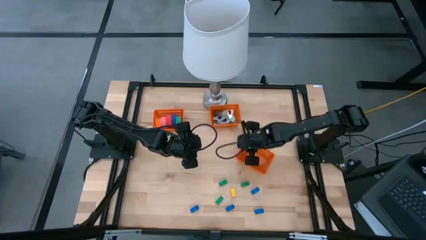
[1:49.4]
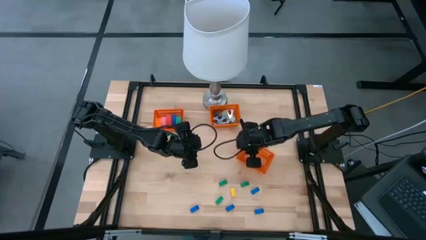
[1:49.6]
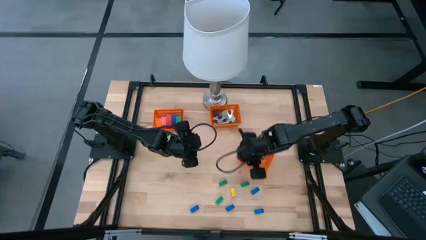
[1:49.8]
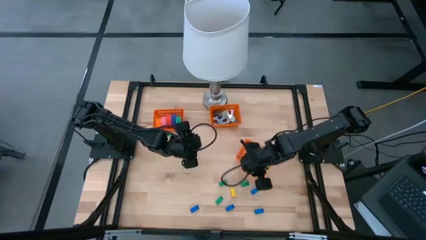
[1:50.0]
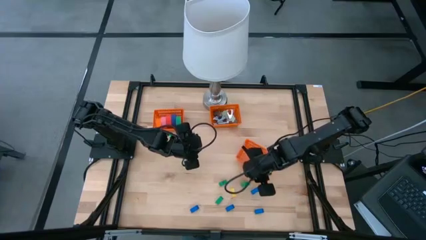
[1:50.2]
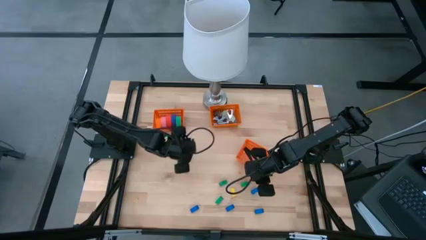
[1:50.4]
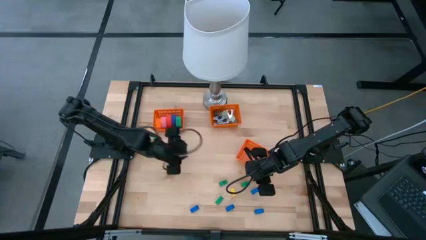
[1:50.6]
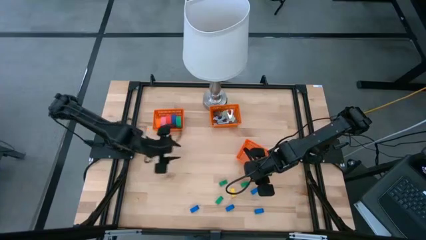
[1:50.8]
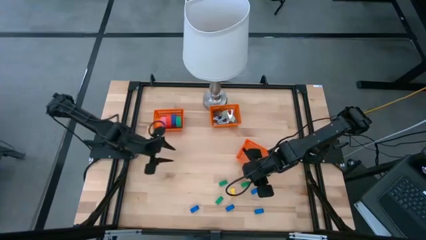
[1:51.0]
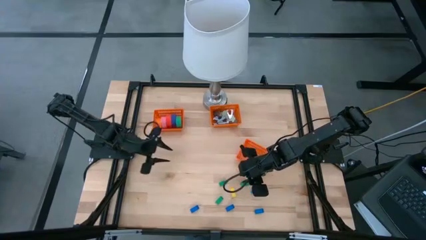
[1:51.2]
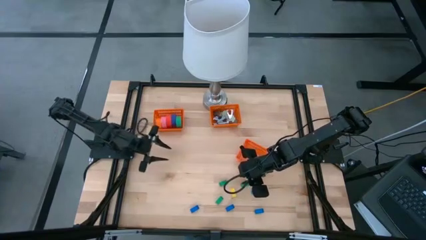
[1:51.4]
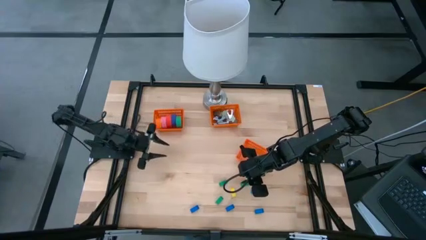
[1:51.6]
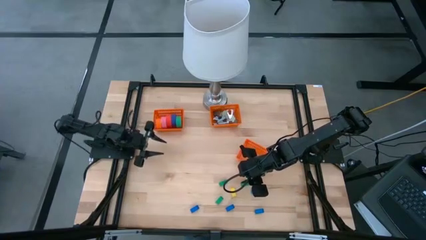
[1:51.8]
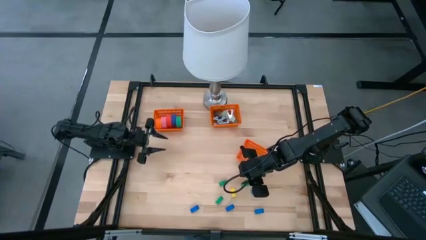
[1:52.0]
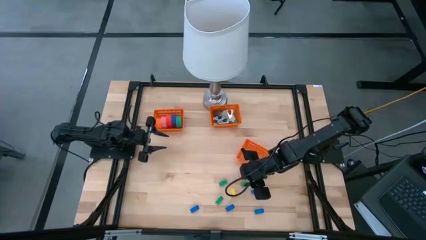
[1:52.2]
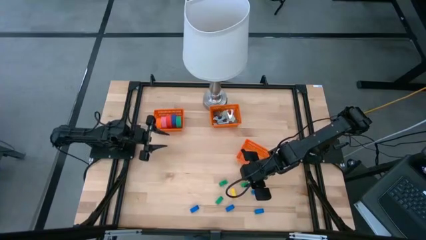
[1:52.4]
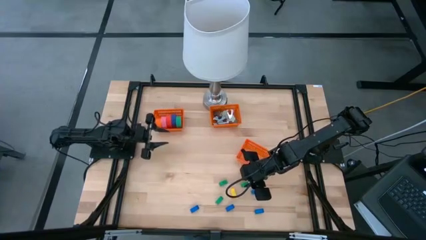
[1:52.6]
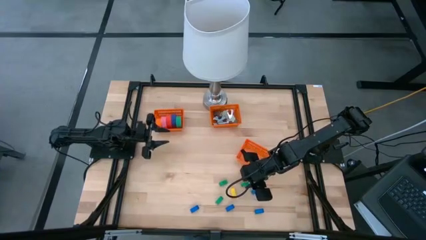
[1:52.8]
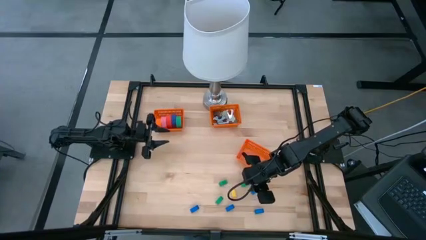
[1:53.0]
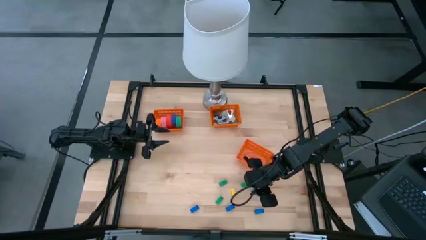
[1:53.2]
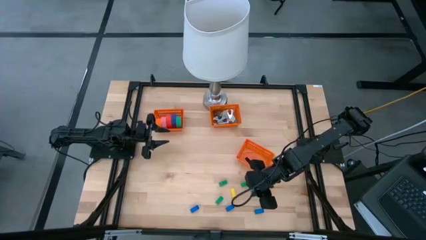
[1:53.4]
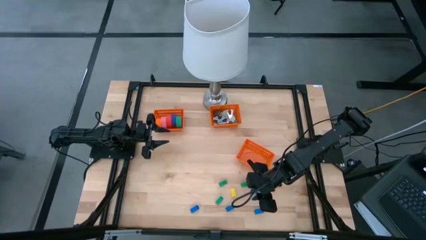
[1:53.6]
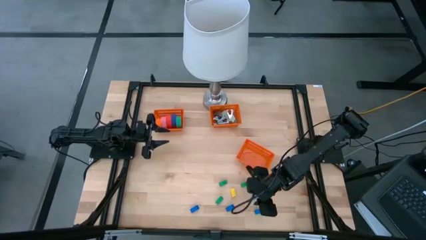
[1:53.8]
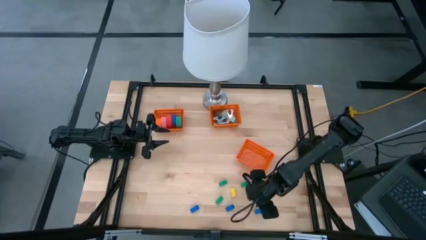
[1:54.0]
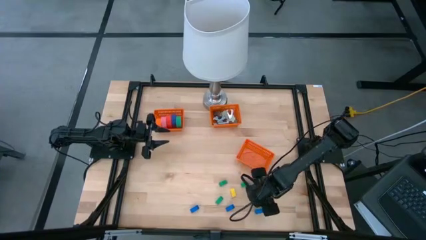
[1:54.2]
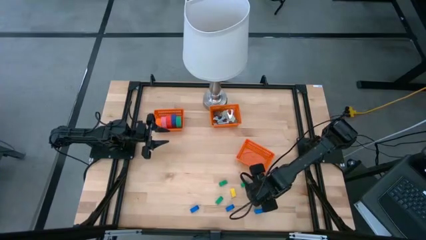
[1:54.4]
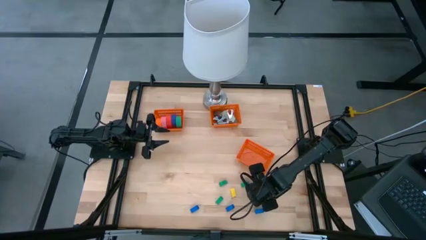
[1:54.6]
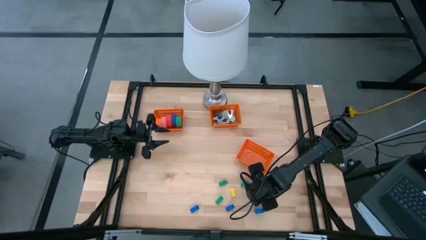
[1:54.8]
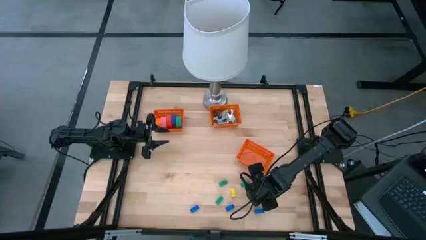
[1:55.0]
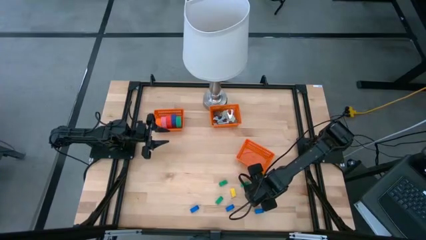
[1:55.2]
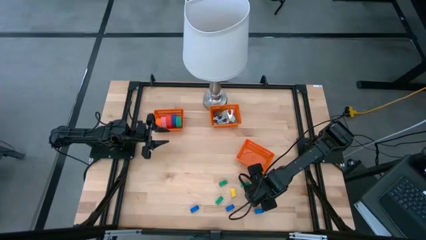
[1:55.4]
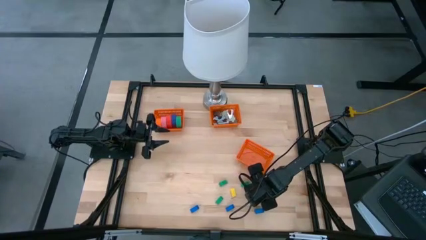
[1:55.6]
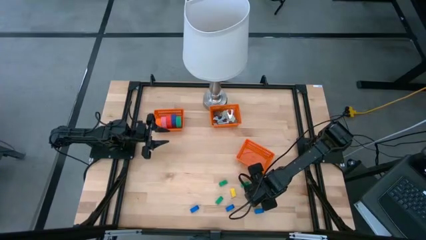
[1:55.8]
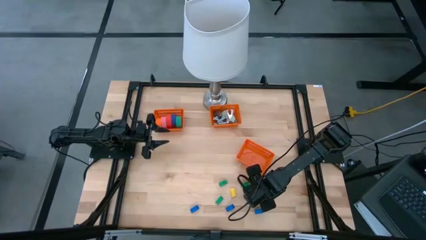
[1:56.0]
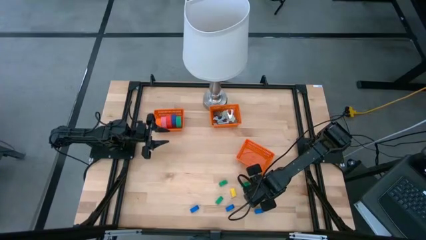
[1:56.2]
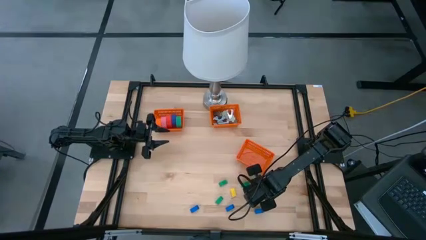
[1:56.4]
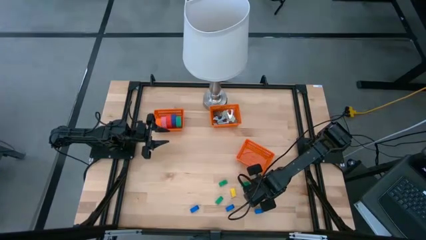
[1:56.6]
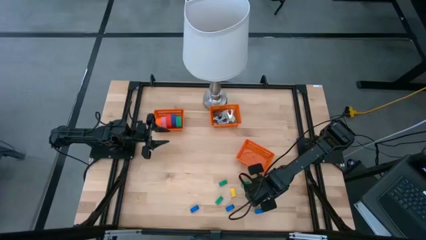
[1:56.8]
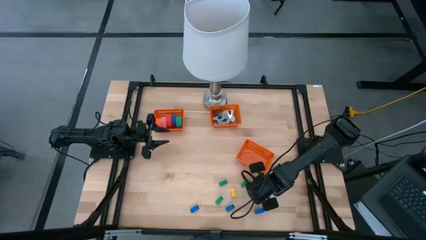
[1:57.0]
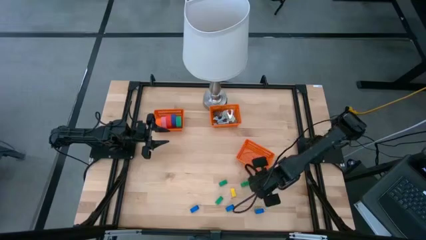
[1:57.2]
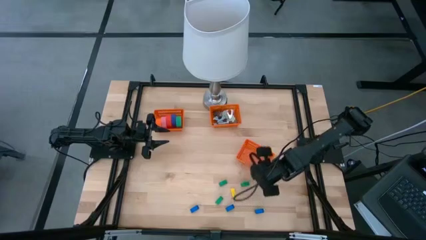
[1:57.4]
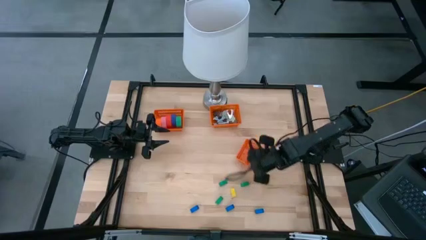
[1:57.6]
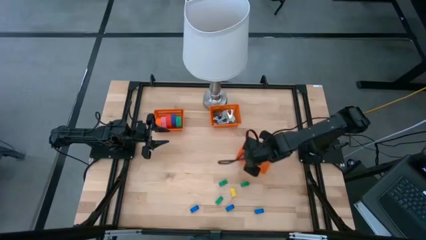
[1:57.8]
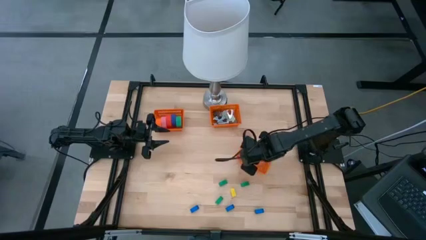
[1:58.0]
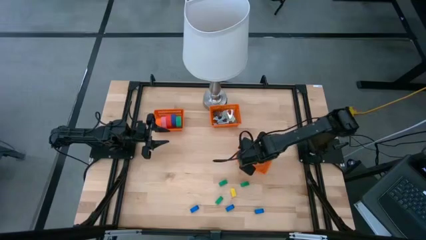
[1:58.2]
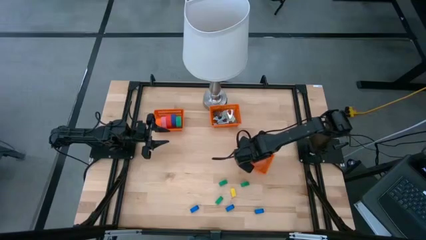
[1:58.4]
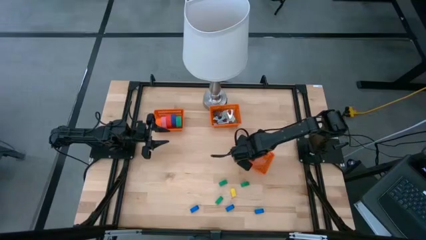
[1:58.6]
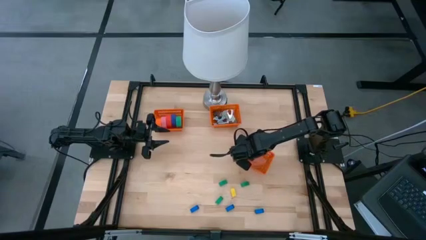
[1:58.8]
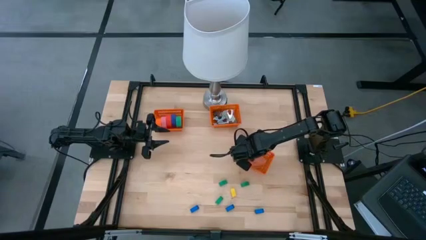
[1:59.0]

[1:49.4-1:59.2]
Task: Pick and place Stapler, Stapler remover, tape
Put the blue stapler into the bottom orange bin

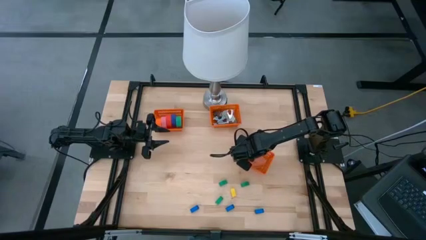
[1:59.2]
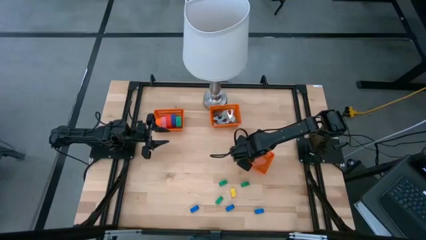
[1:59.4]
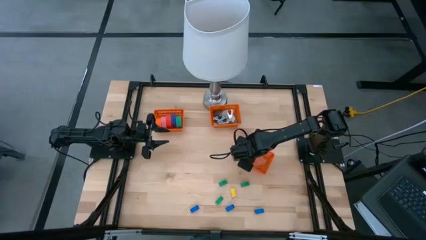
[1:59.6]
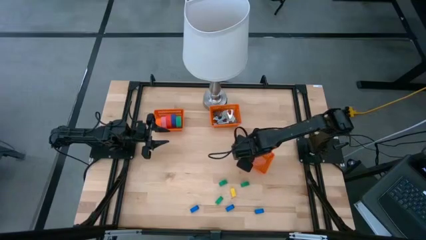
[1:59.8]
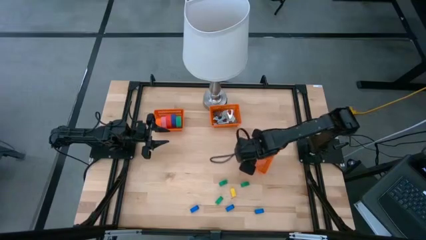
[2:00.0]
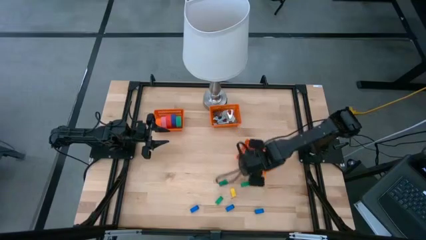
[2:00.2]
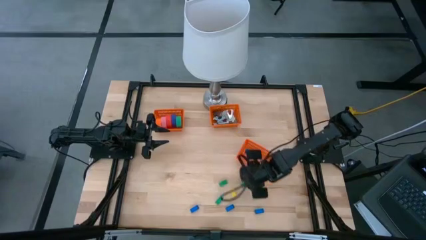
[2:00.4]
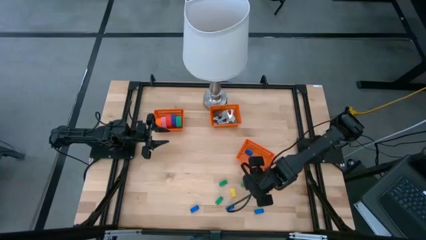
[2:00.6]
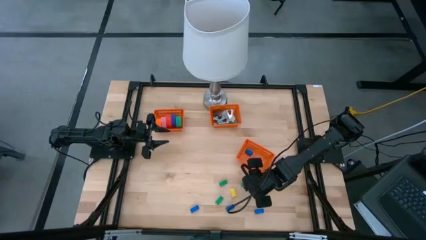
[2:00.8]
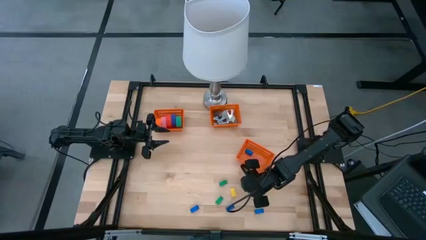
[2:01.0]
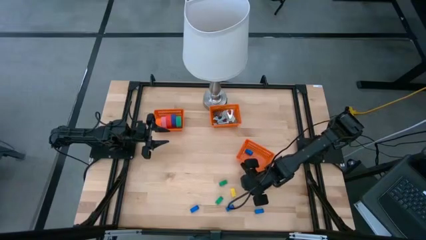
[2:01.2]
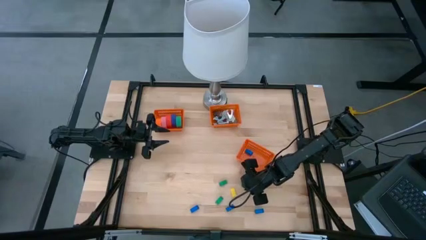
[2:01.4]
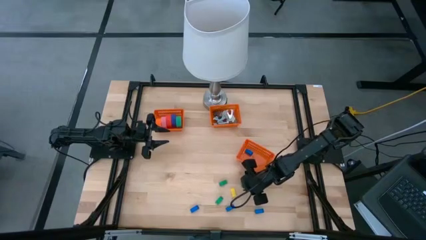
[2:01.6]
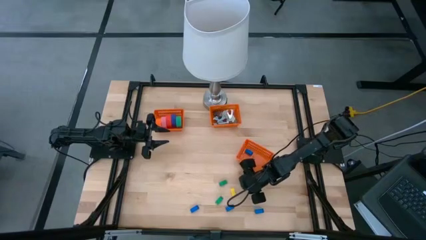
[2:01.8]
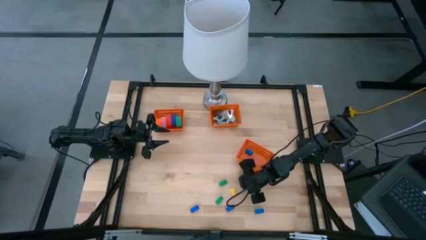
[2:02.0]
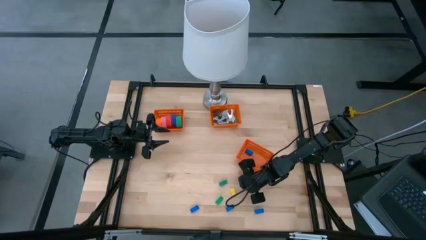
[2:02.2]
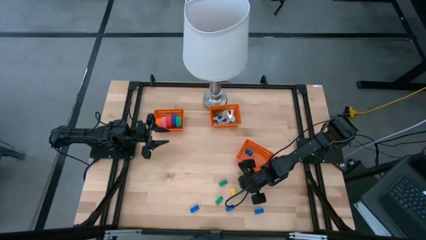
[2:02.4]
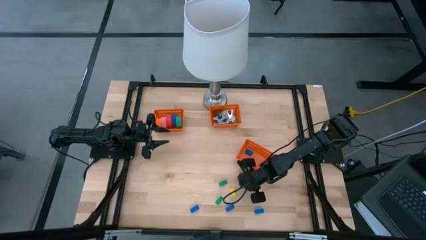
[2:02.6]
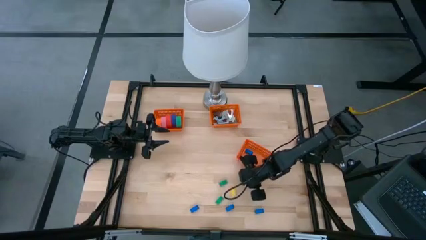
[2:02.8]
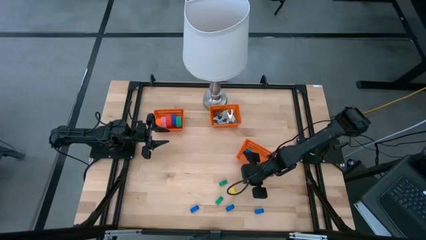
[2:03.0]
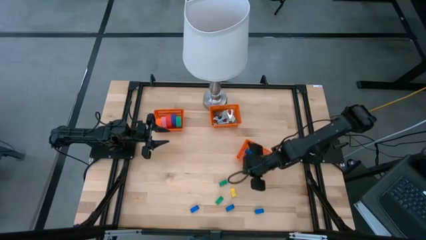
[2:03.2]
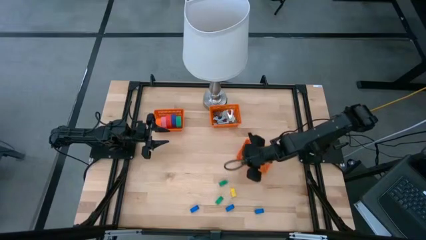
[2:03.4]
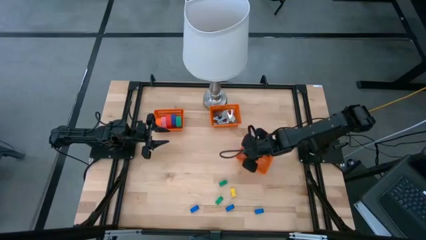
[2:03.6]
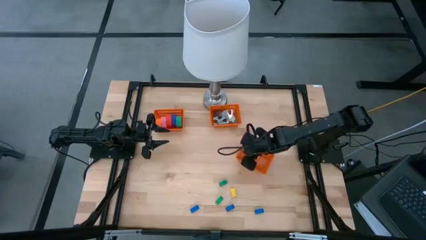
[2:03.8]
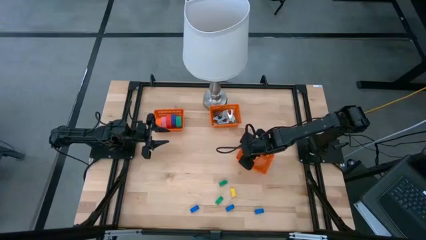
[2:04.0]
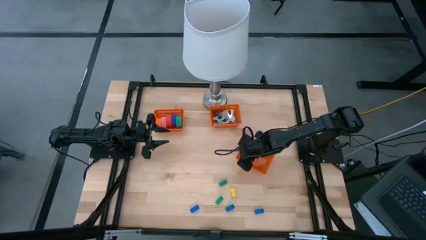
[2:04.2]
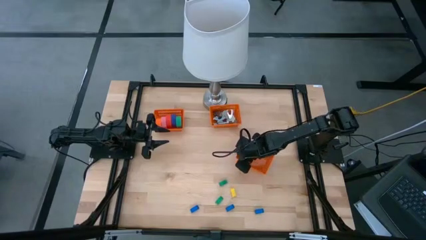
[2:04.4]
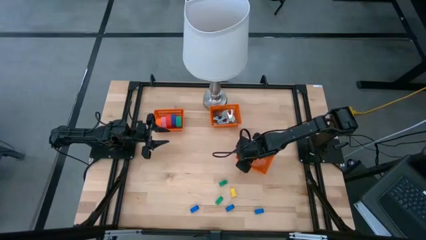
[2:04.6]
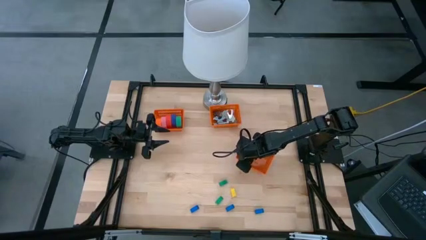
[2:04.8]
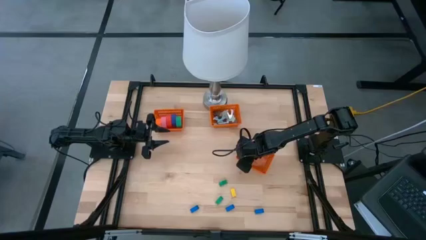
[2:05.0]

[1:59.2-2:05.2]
Put the green stapler into the bottom orange bin
